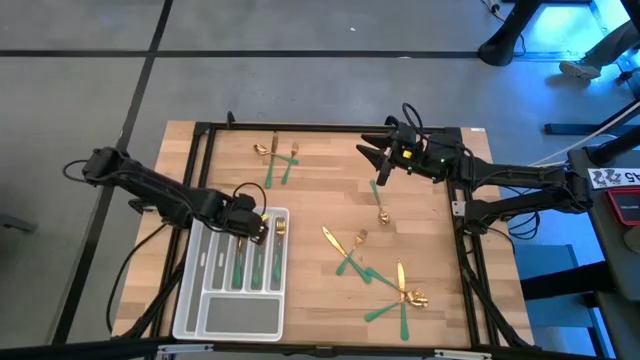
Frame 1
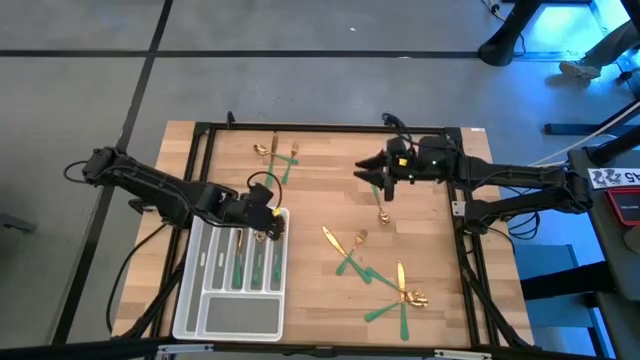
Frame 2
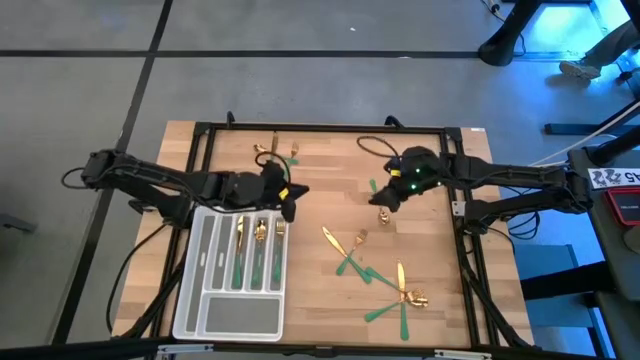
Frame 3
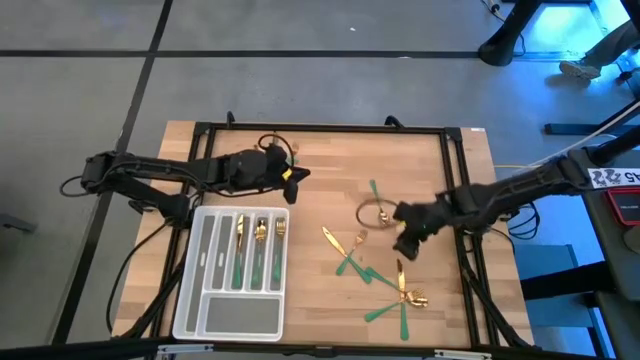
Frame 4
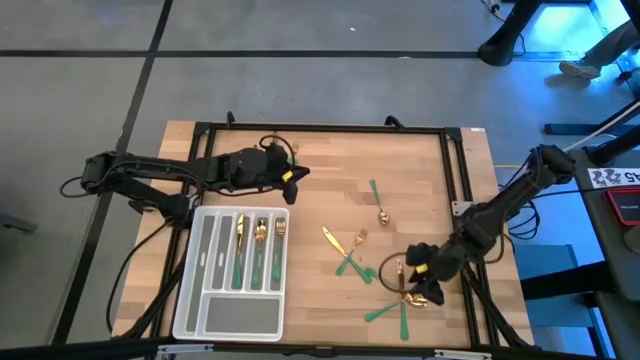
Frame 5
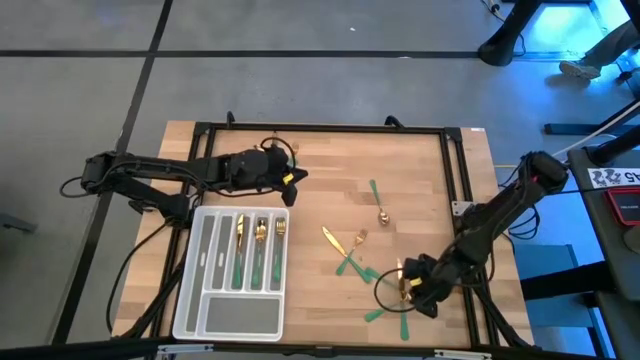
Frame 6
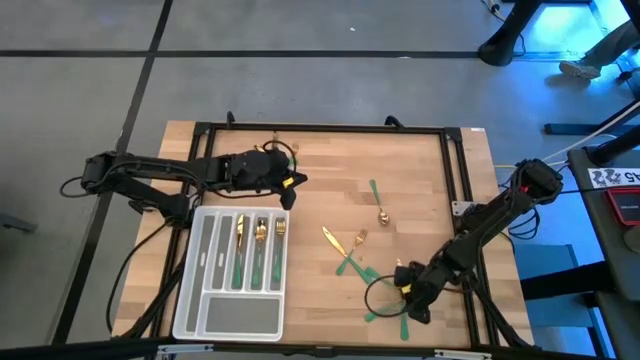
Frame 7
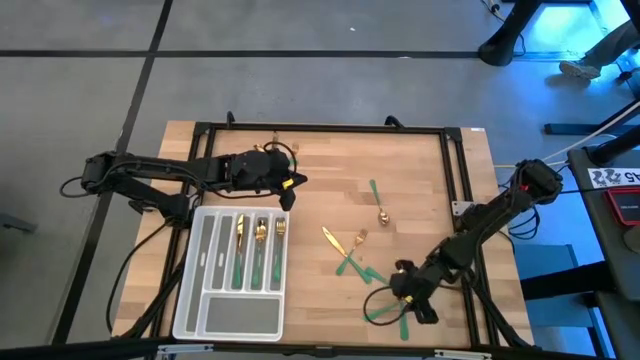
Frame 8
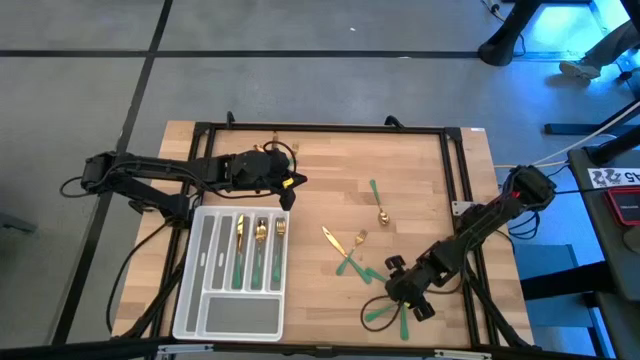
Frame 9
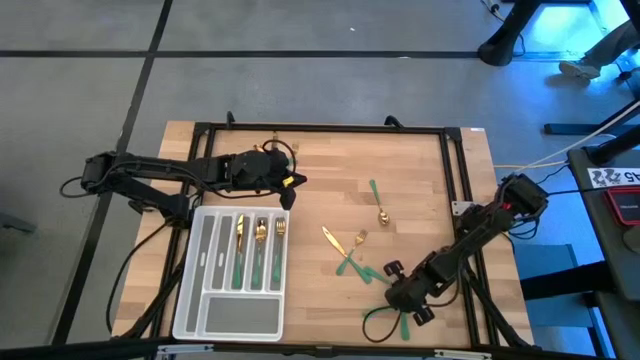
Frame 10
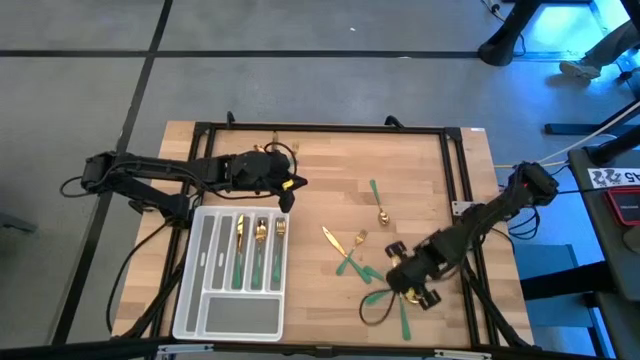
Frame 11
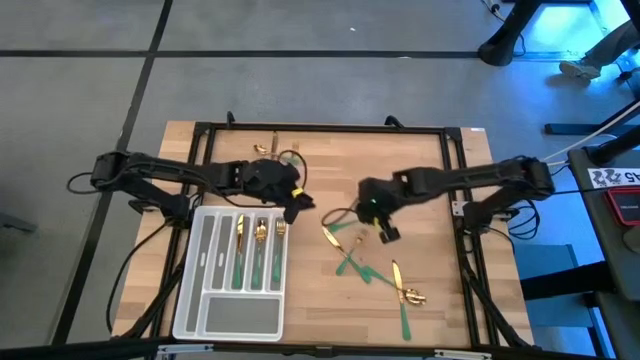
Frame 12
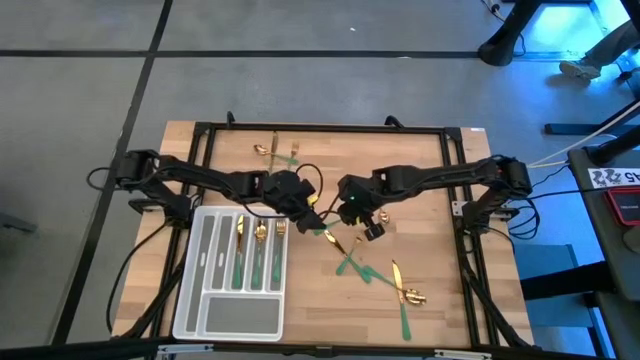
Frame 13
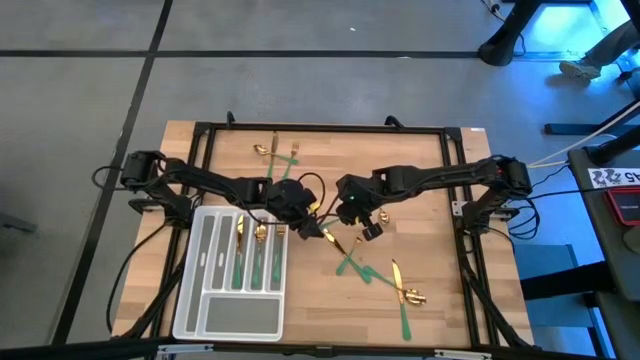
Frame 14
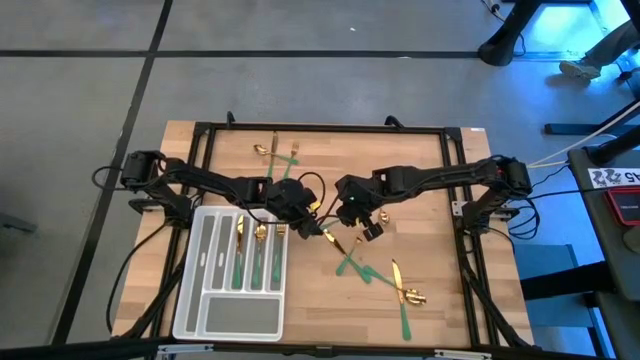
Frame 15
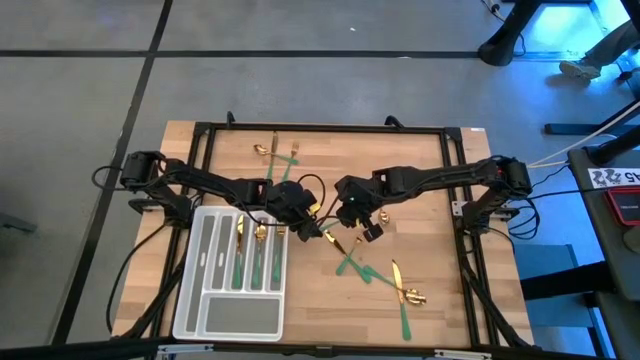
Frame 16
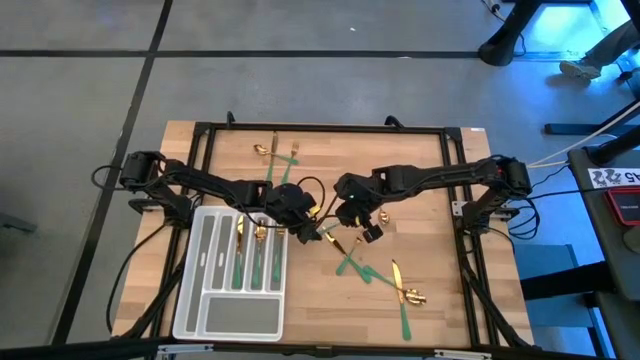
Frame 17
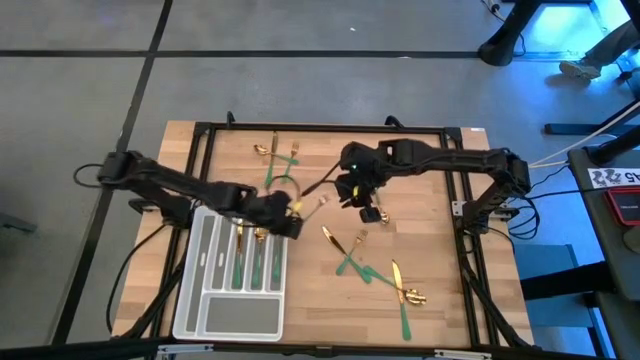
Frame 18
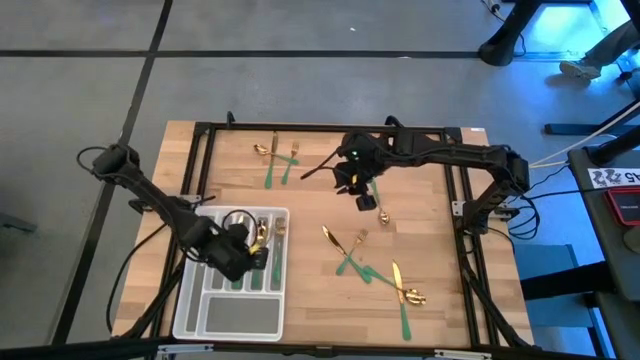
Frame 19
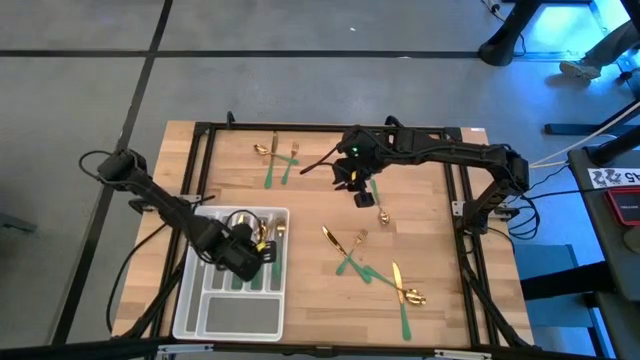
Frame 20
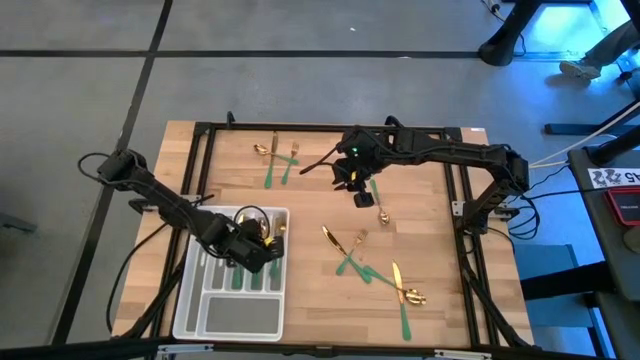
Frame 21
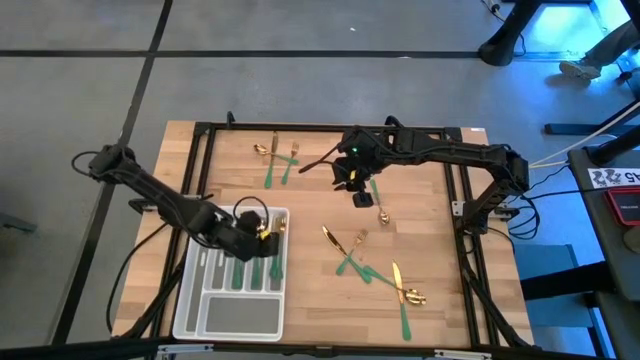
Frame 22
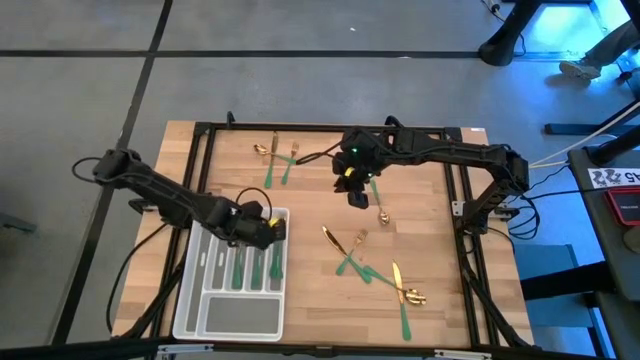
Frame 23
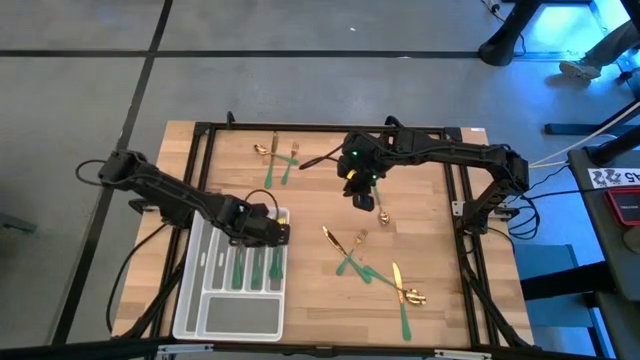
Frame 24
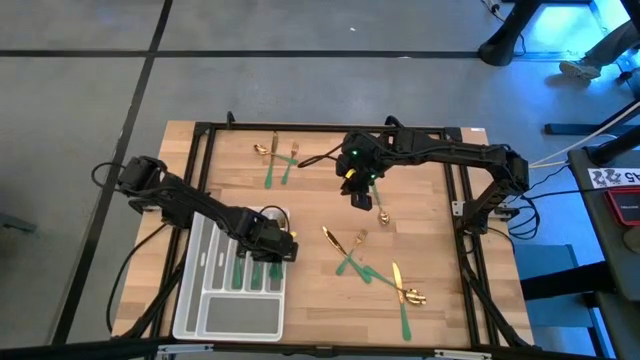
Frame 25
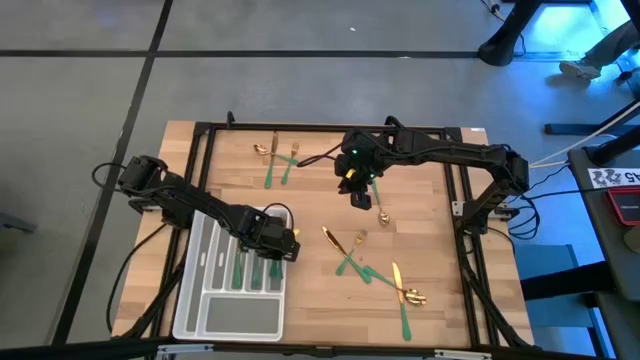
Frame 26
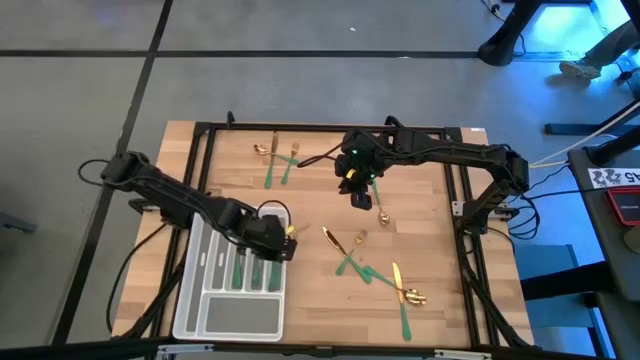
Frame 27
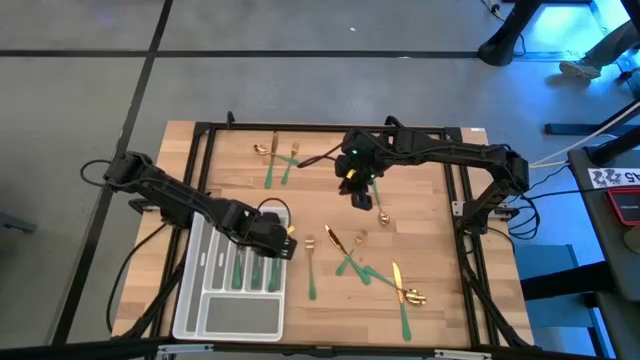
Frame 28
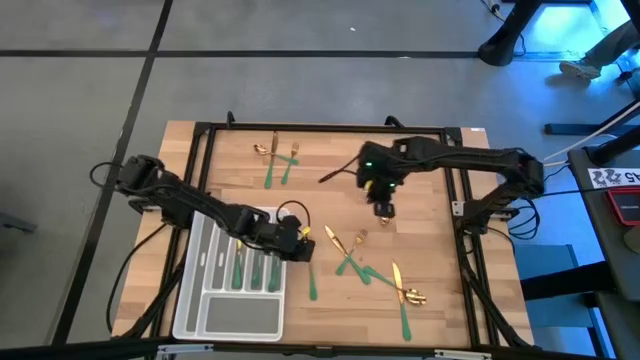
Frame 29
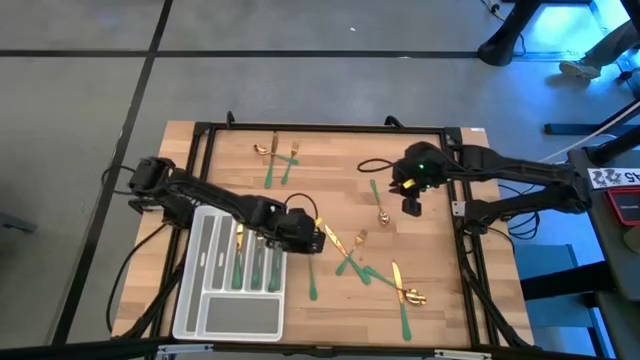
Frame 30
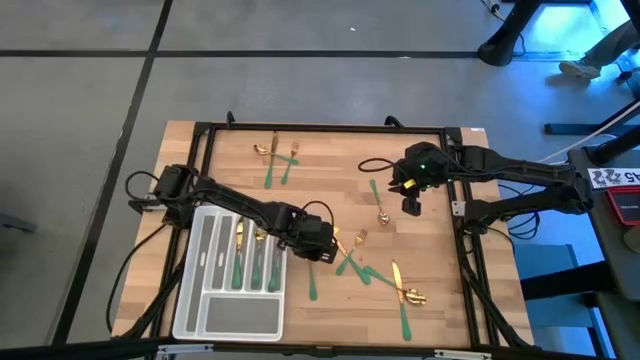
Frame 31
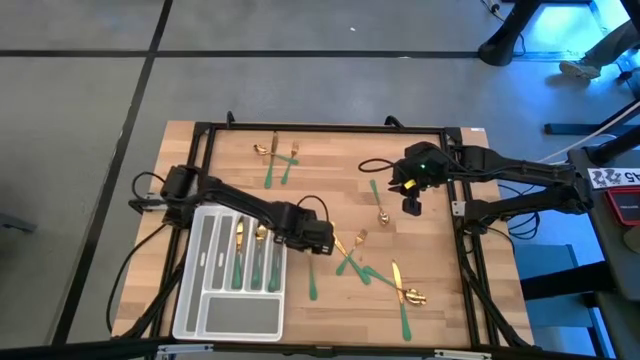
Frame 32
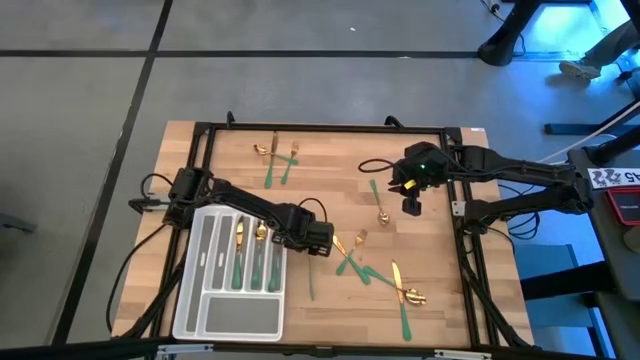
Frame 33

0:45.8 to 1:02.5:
Task: Sort silverware
Put the fork into the silverware tray

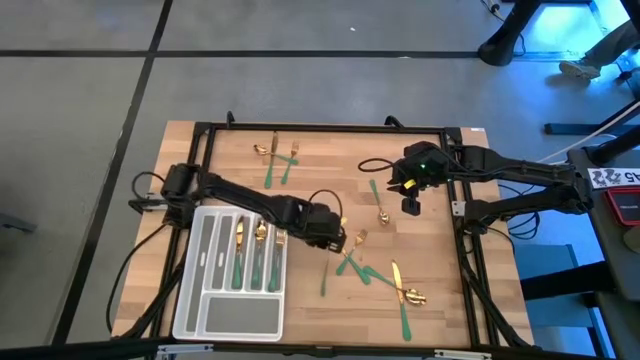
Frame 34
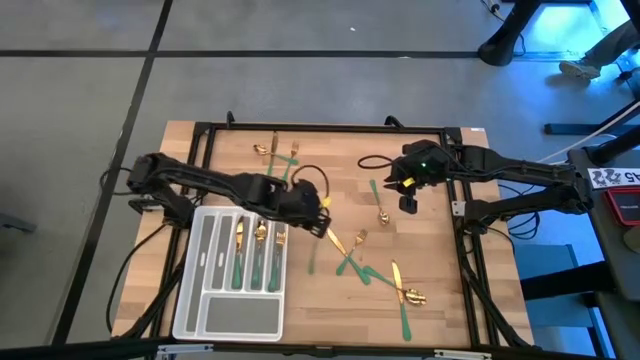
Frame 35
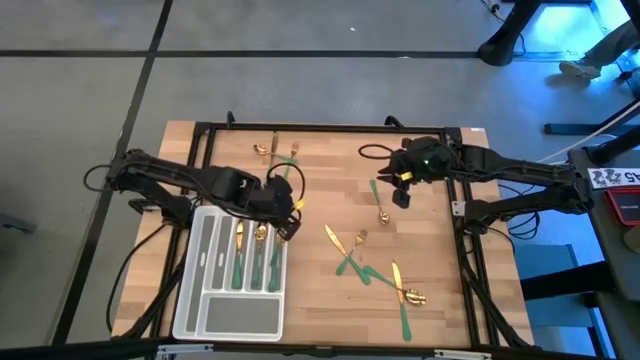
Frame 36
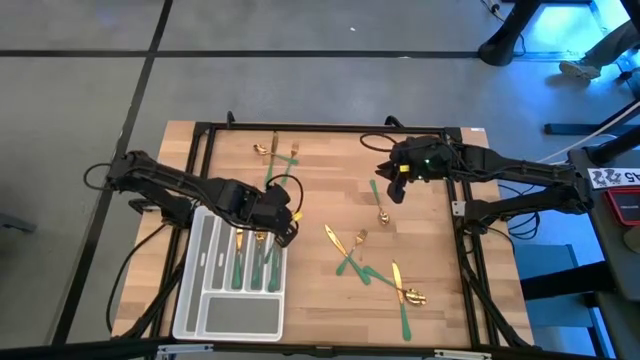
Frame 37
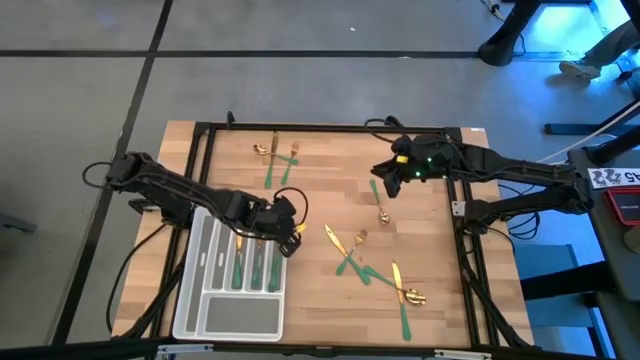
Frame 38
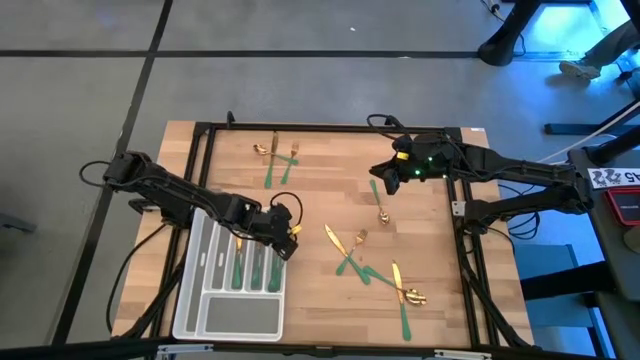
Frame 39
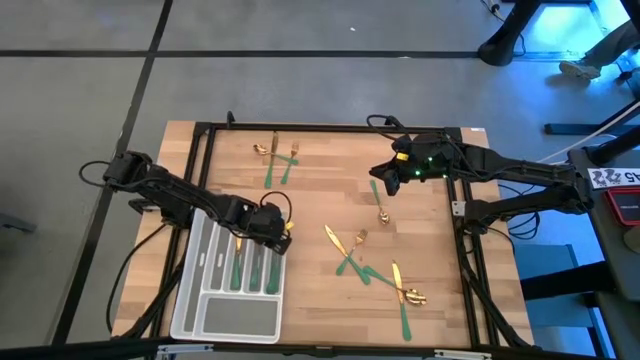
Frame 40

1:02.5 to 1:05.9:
Put the fork into the silverware tray
